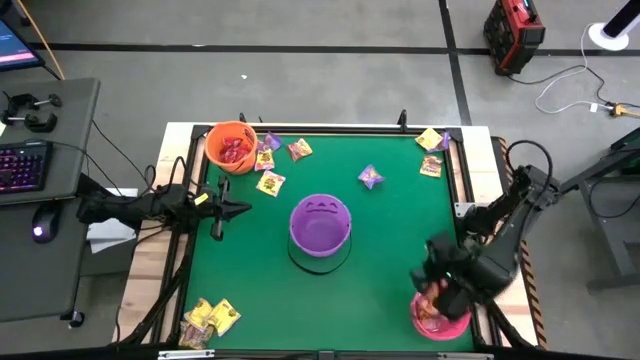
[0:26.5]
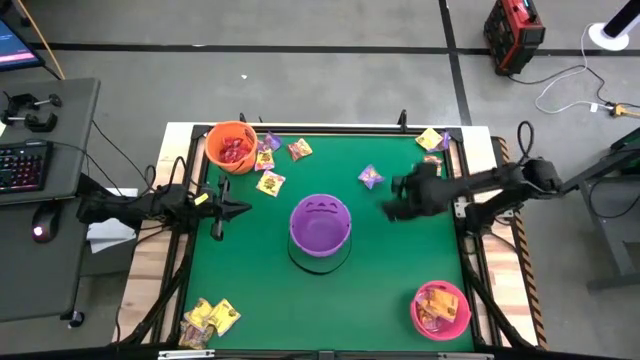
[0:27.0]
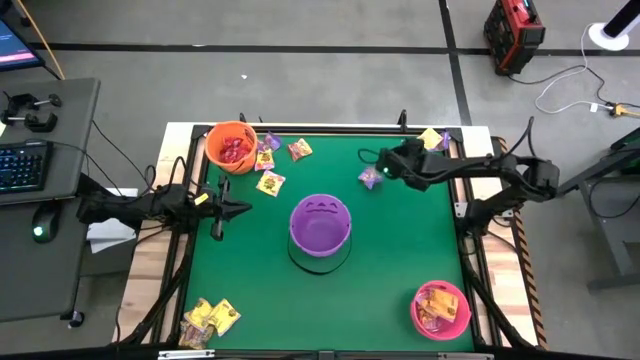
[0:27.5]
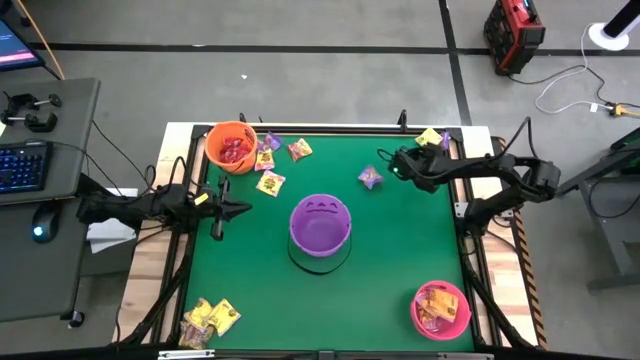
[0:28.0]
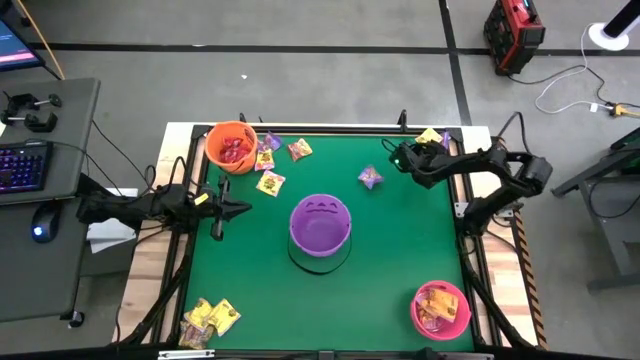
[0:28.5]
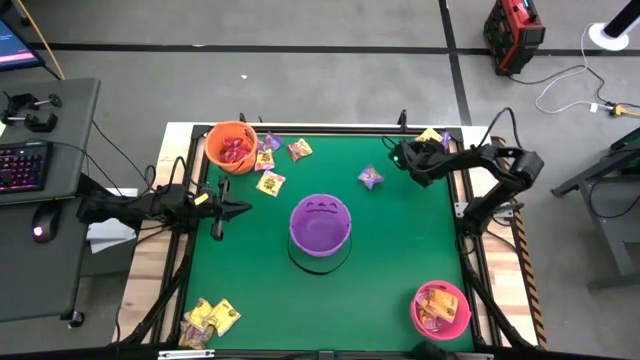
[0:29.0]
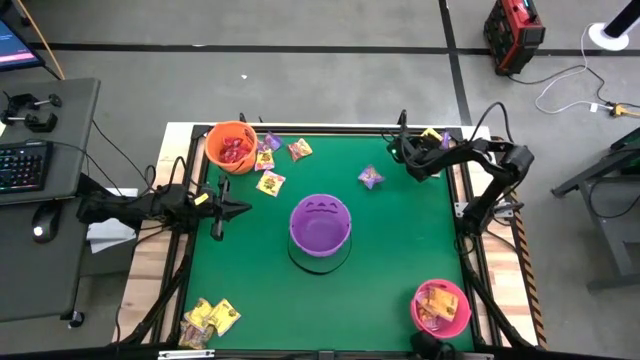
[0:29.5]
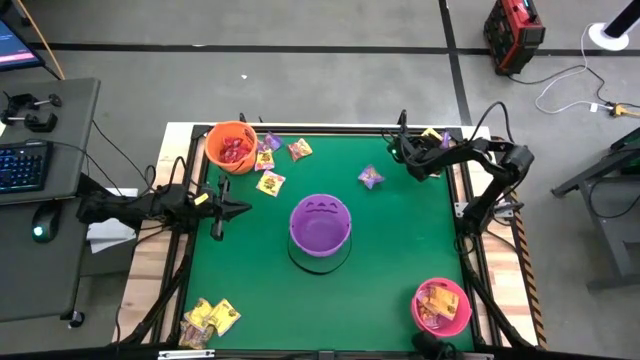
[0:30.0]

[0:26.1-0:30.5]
Task: Sort candy by brand, put in halloween buckets
Put the yellow candy into the pink bucket

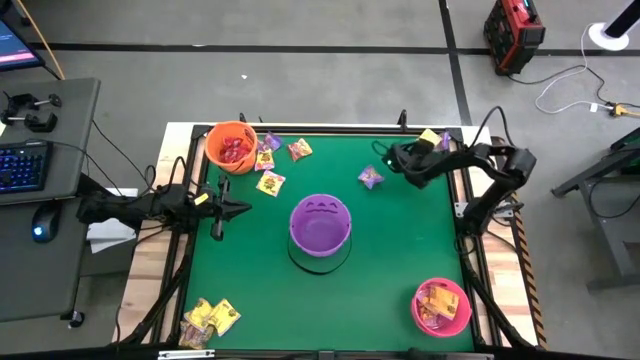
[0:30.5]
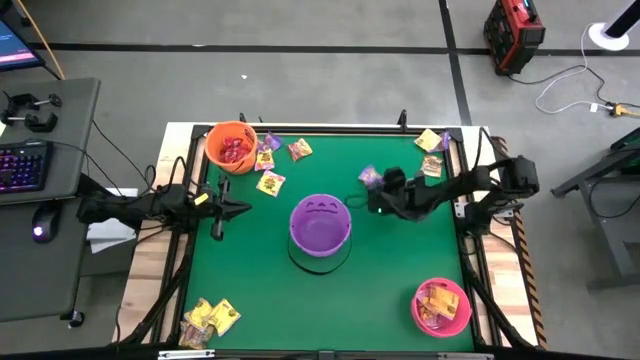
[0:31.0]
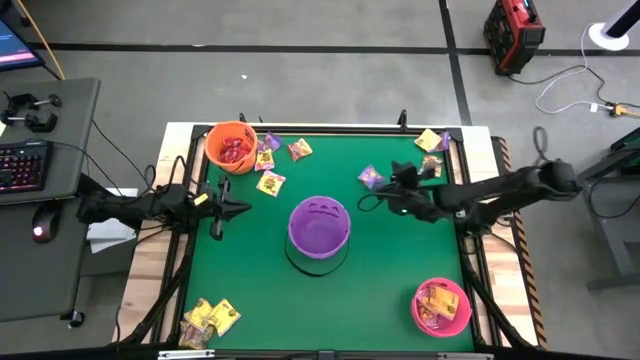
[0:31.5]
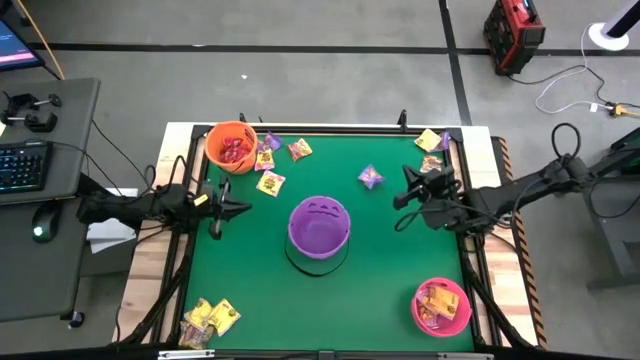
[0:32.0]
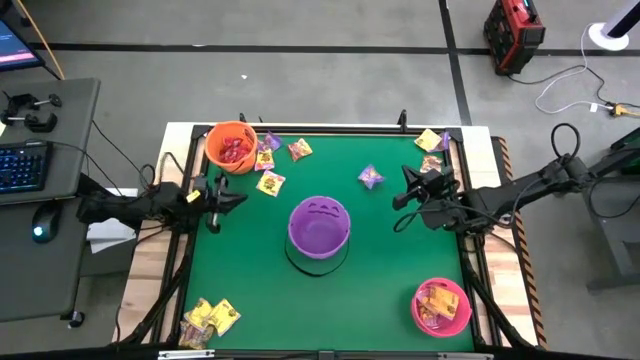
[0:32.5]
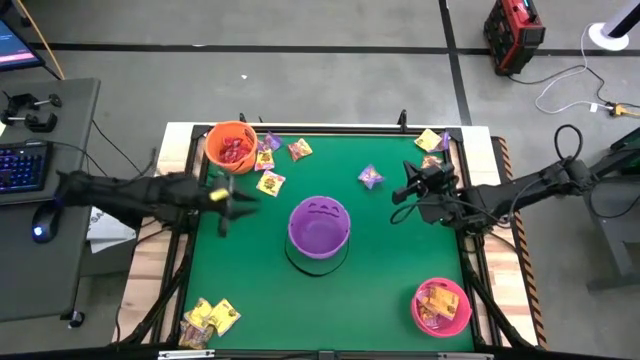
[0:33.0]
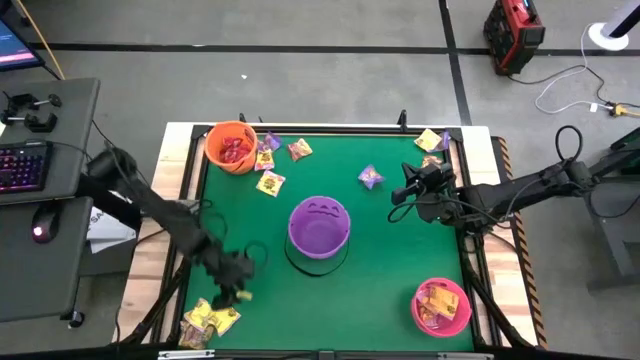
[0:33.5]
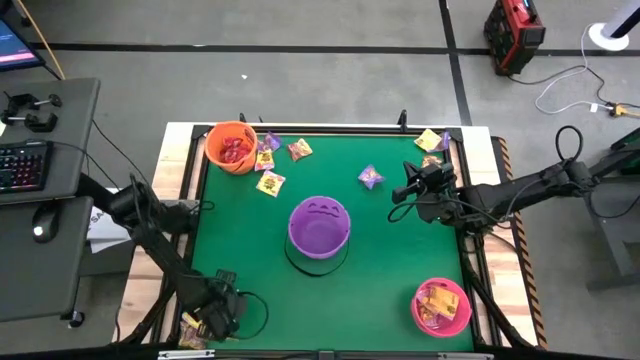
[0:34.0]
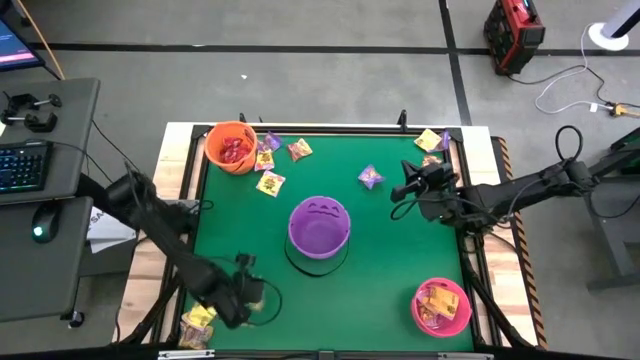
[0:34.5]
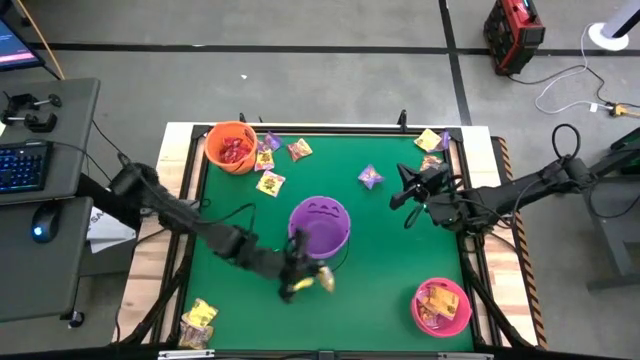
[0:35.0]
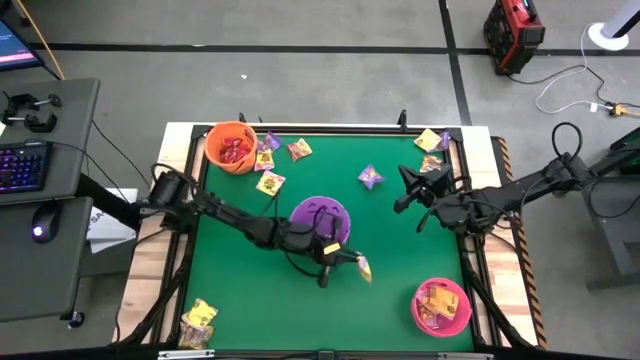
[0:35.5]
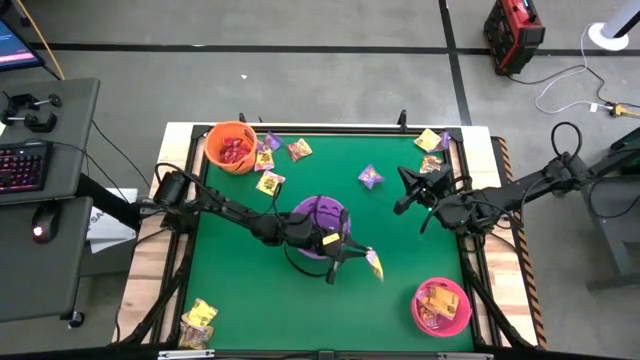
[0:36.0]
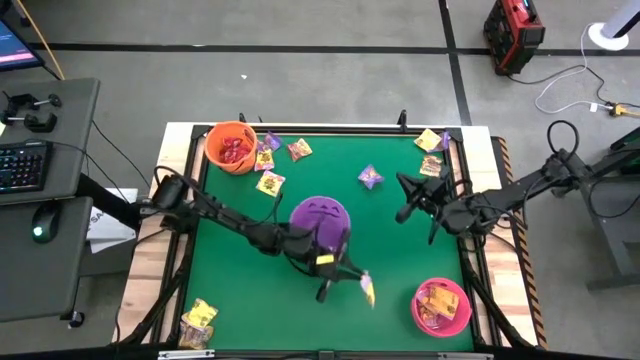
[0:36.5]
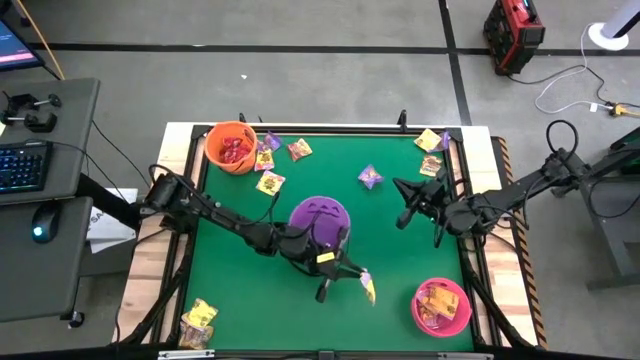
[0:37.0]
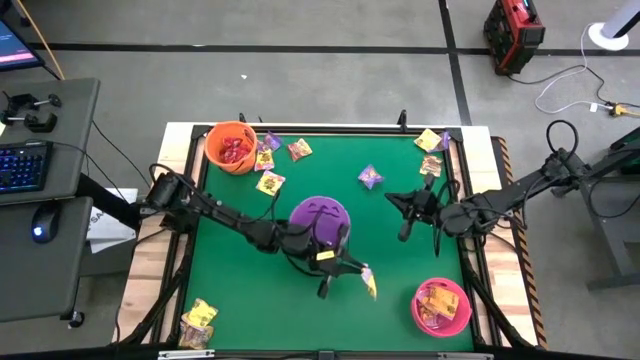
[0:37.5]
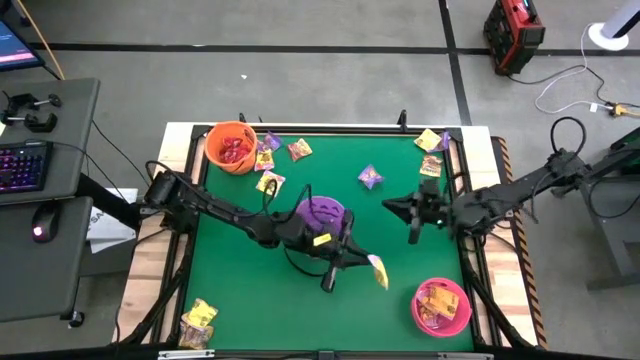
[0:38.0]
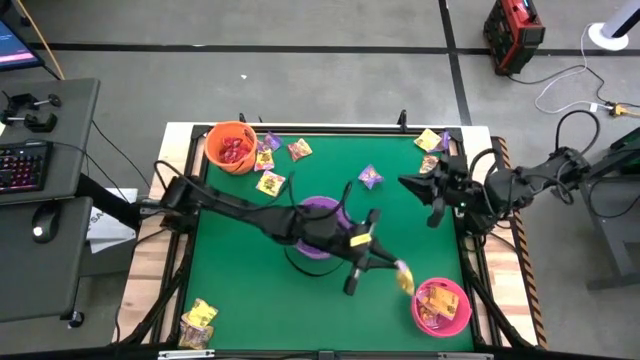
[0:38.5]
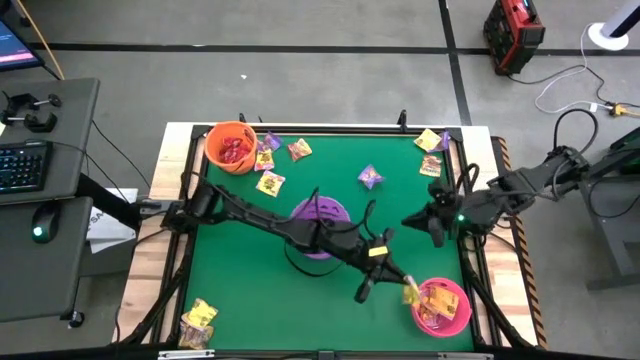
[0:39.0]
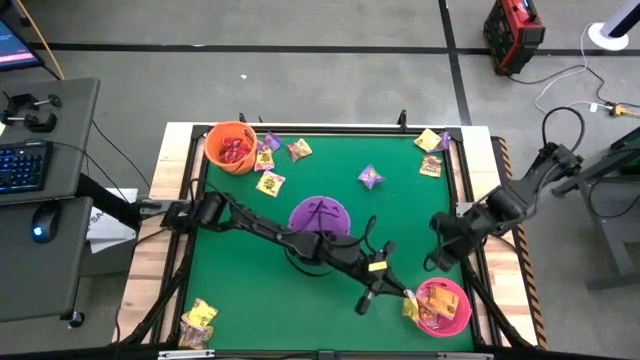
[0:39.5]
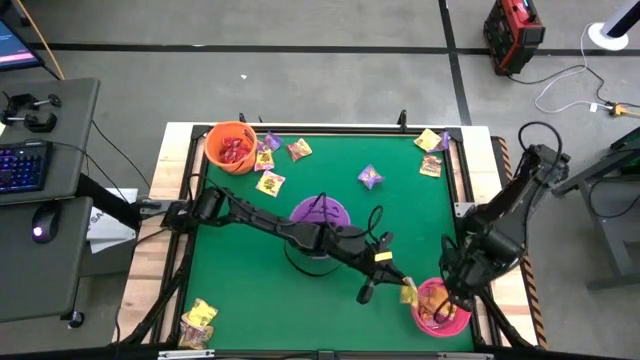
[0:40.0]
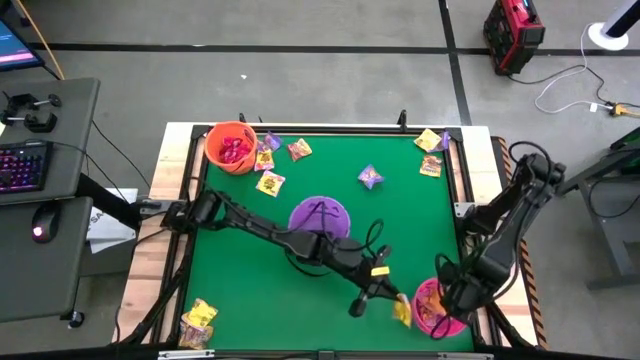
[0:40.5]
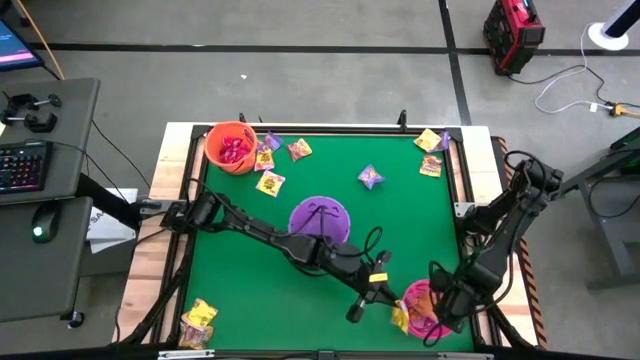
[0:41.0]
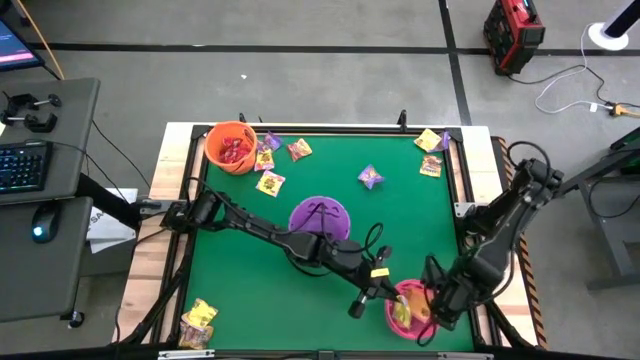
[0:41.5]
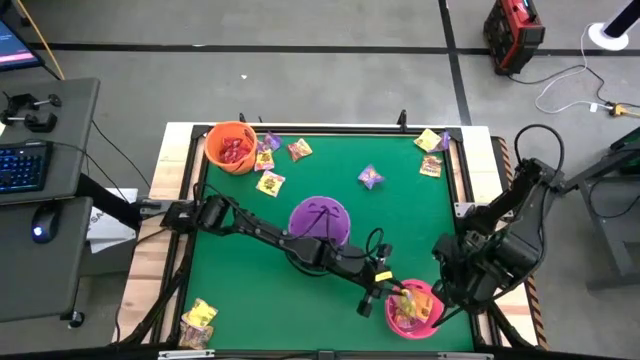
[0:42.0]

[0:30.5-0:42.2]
Put the yellow candy into the pink bucket

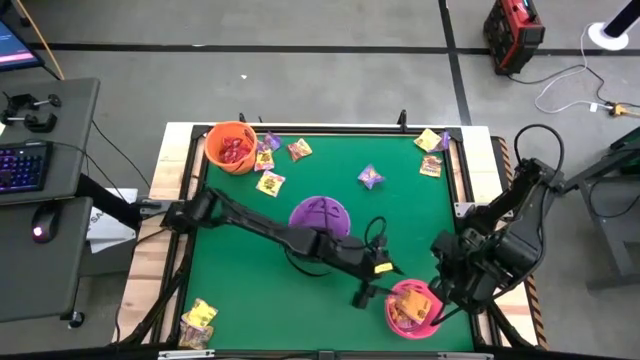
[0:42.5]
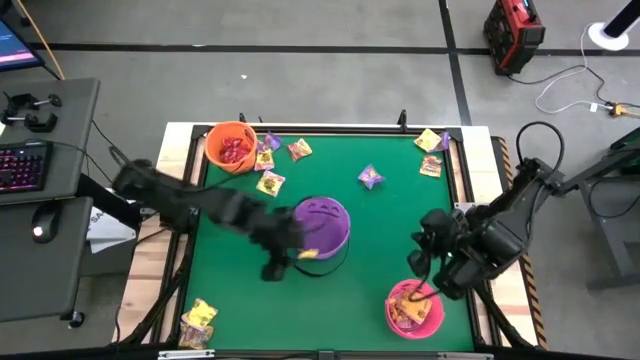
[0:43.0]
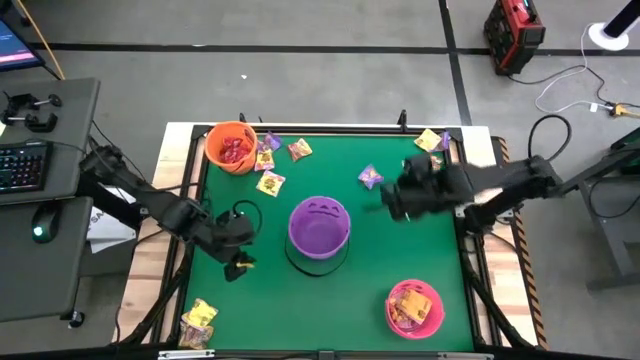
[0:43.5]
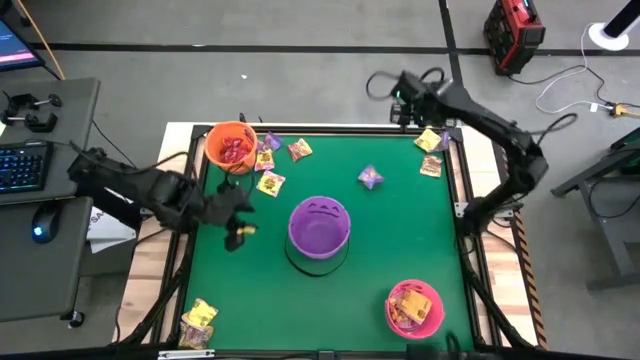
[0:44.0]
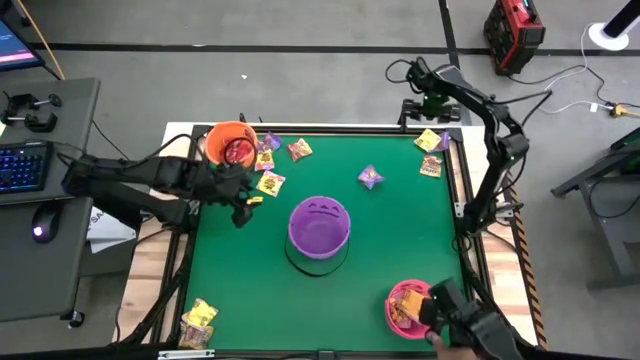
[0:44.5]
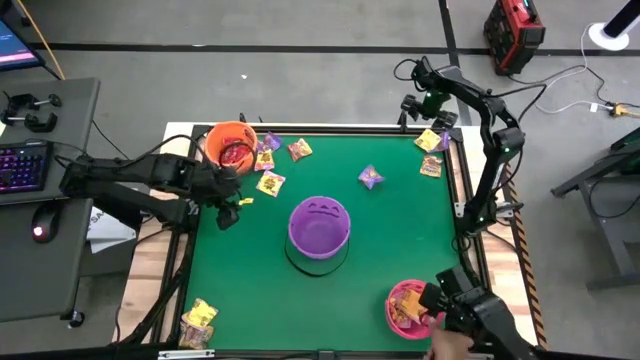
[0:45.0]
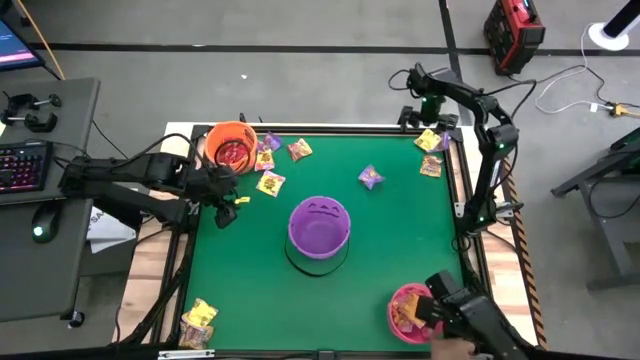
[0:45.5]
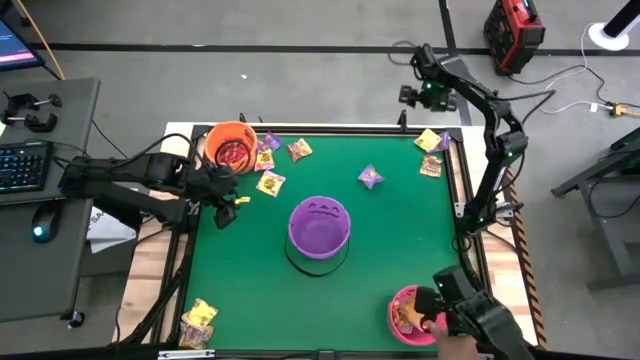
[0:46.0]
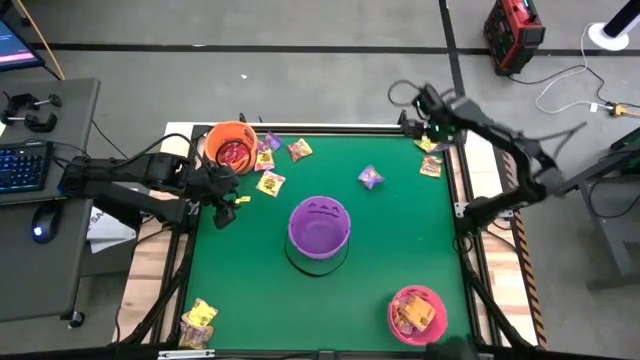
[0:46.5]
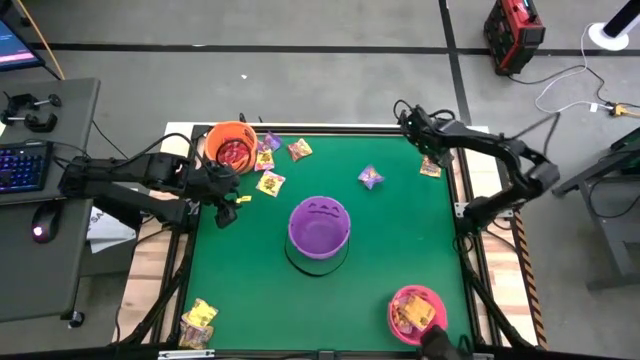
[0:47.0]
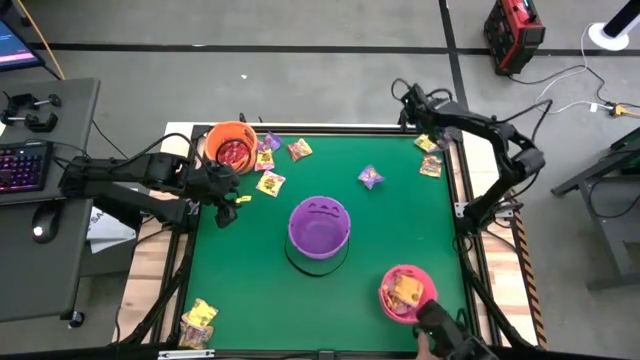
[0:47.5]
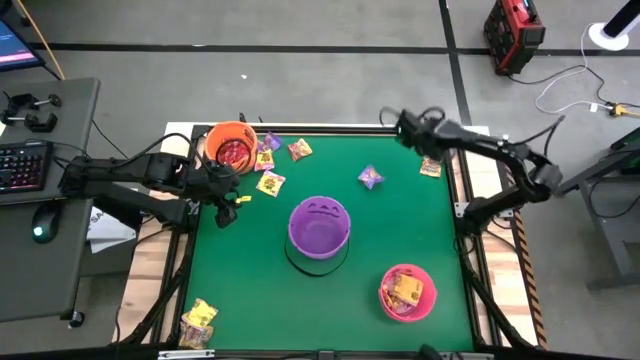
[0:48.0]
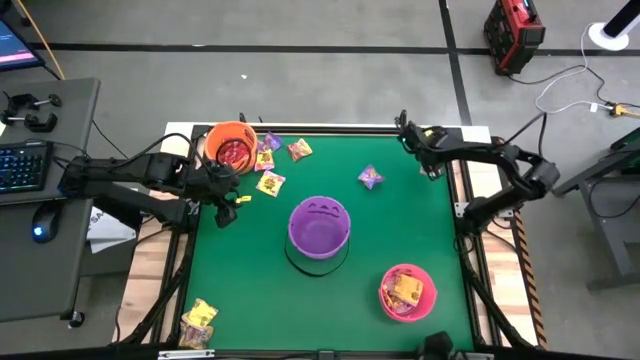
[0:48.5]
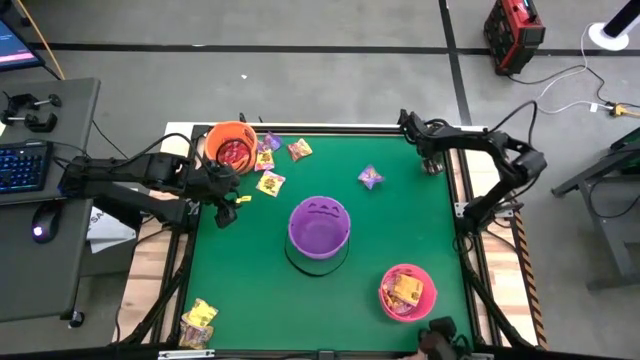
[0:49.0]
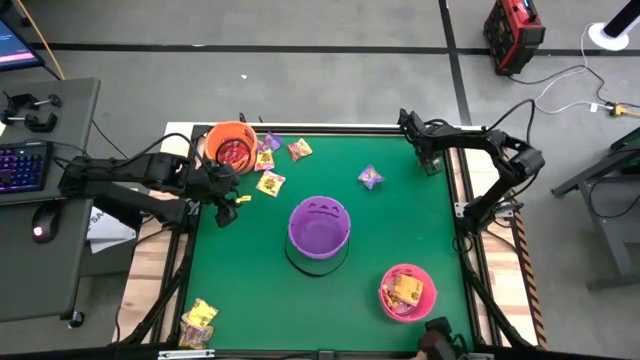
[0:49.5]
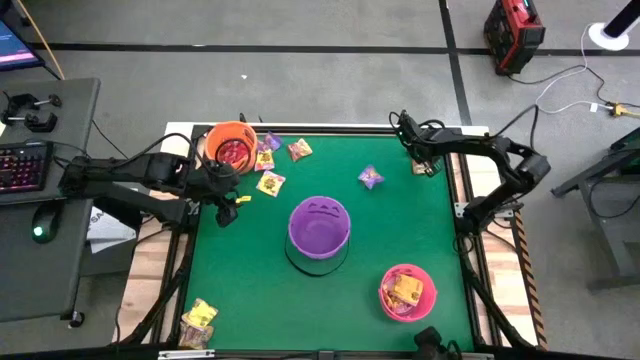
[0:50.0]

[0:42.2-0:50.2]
Put the yellow candy into the pink bucket
